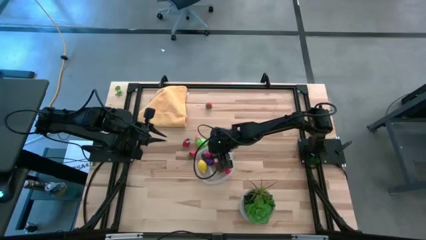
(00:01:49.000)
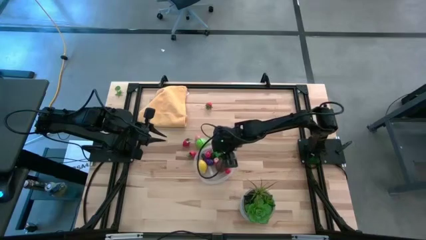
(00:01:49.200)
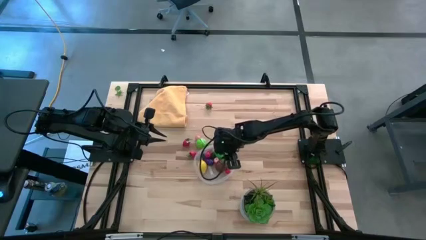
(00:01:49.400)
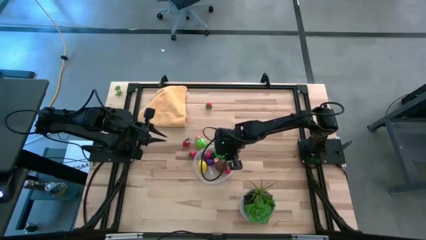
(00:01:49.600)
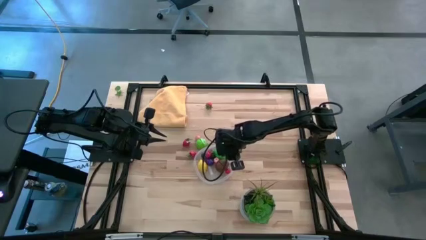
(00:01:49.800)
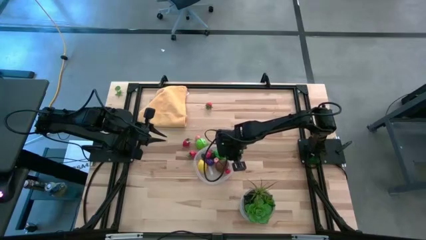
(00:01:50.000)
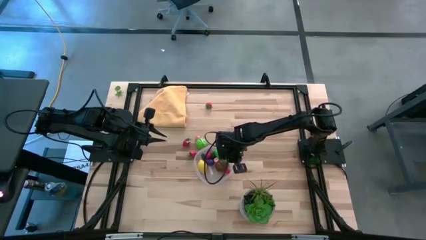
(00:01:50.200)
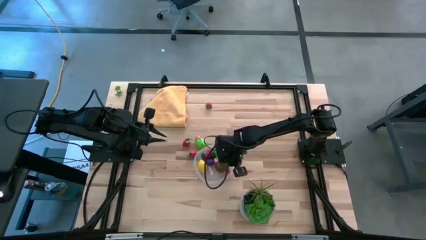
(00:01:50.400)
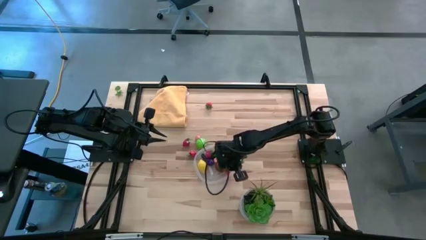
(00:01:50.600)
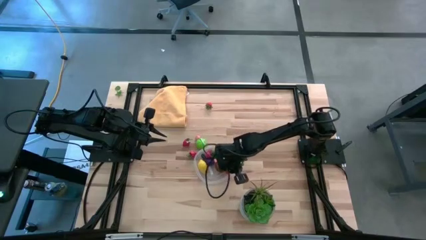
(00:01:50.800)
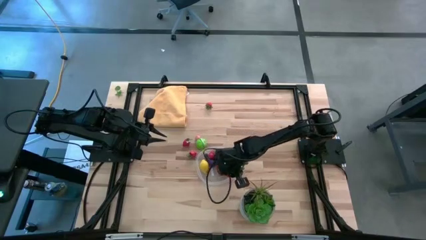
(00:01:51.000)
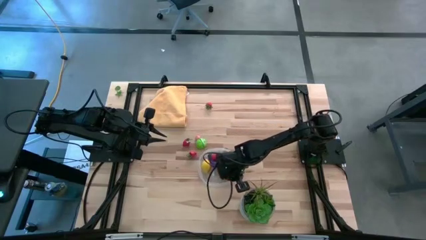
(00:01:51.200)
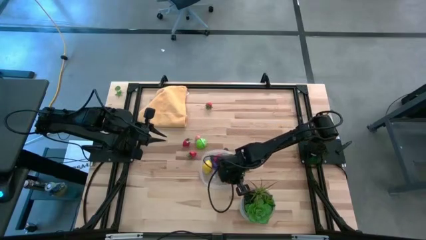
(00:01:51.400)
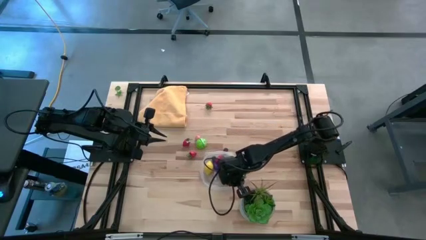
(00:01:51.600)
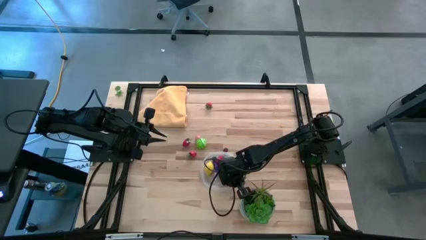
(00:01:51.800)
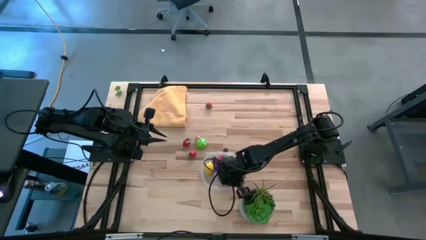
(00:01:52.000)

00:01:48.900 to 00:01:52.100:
Task: Pick and placing Produce into tupperware
Adjust the transparent bin

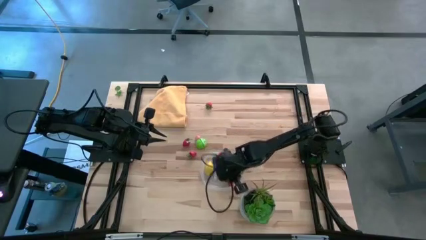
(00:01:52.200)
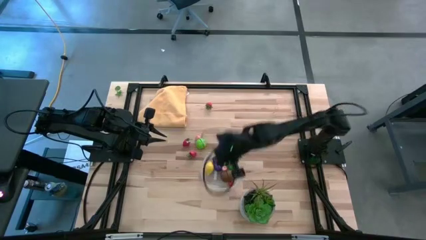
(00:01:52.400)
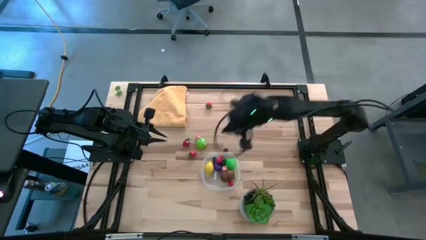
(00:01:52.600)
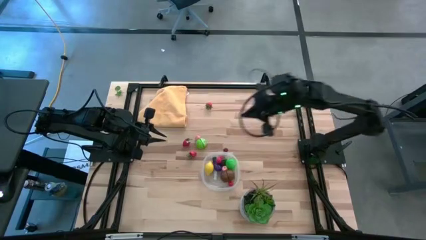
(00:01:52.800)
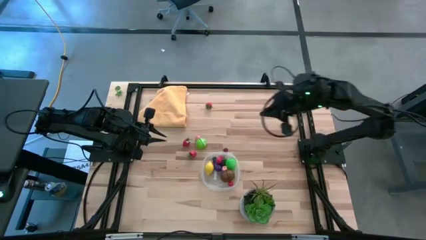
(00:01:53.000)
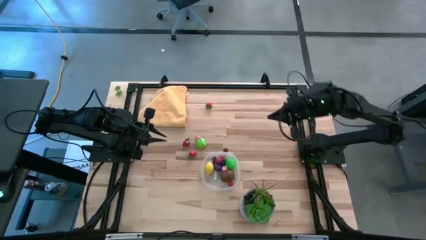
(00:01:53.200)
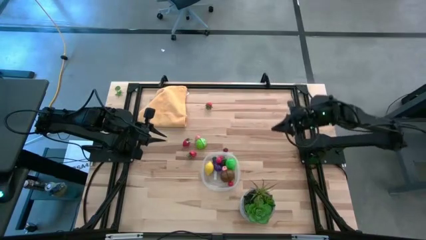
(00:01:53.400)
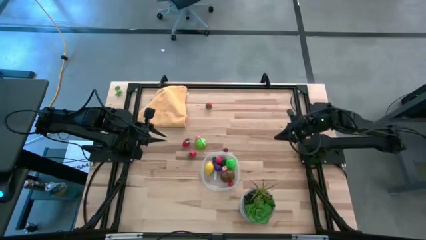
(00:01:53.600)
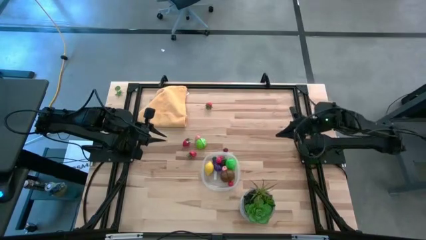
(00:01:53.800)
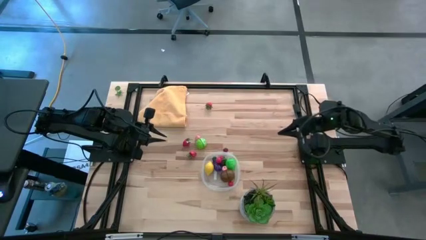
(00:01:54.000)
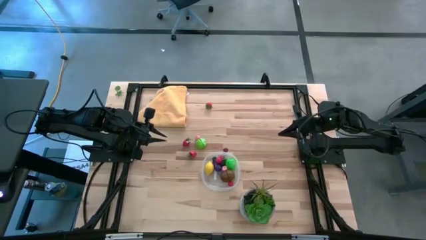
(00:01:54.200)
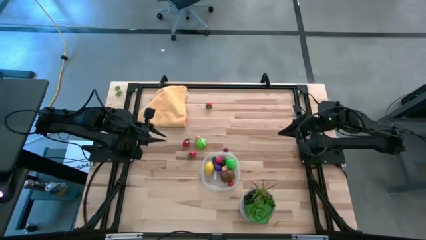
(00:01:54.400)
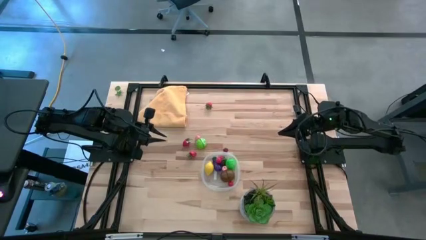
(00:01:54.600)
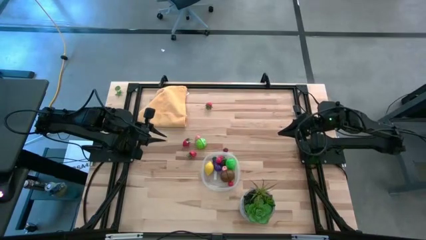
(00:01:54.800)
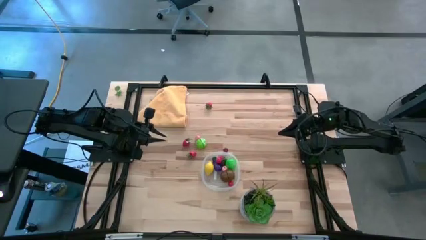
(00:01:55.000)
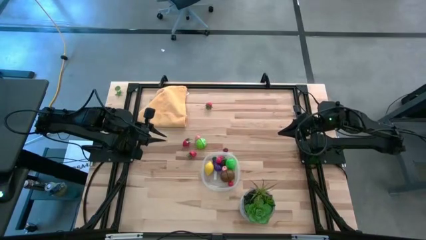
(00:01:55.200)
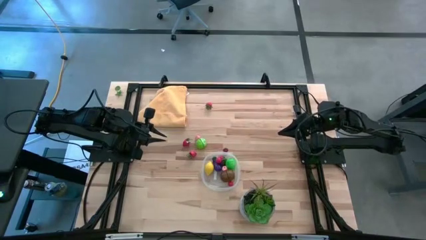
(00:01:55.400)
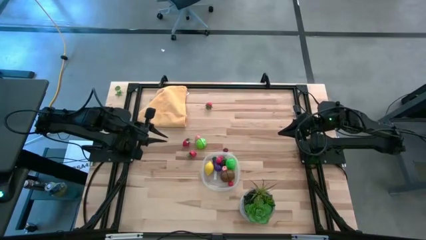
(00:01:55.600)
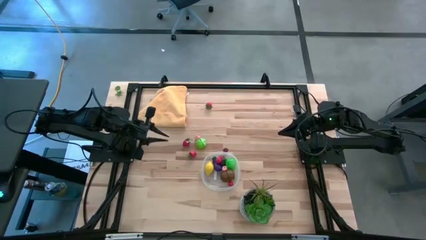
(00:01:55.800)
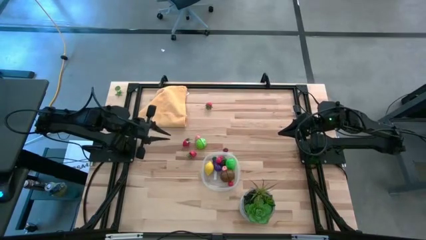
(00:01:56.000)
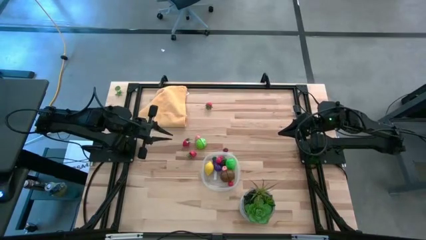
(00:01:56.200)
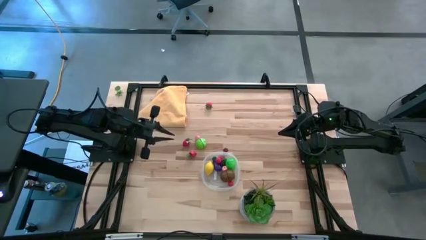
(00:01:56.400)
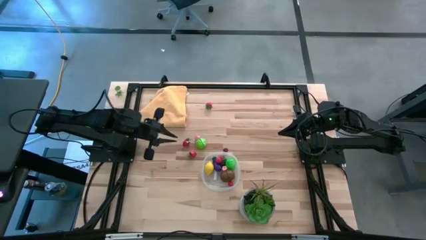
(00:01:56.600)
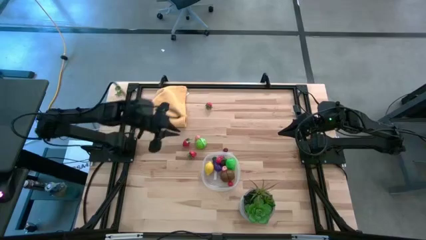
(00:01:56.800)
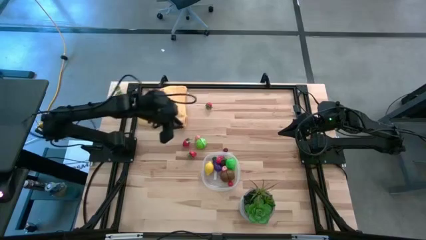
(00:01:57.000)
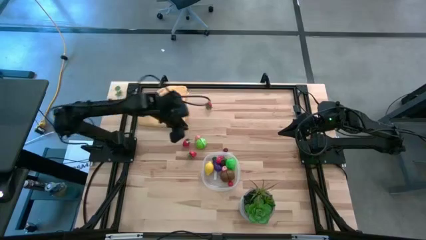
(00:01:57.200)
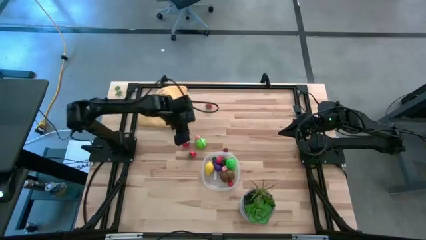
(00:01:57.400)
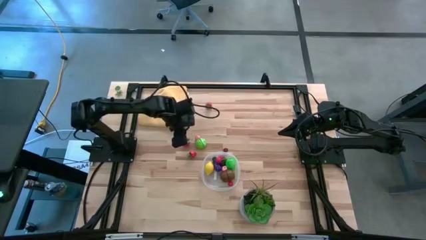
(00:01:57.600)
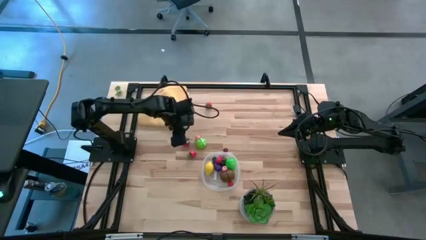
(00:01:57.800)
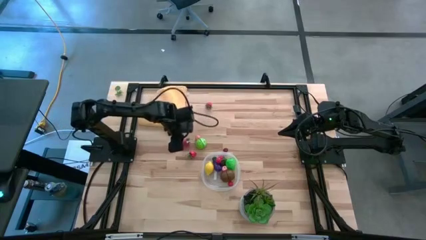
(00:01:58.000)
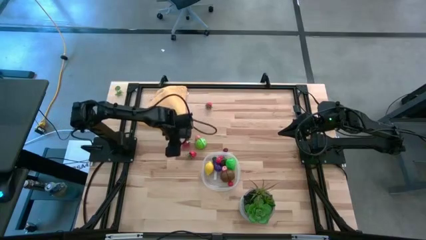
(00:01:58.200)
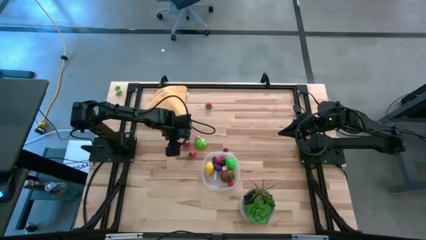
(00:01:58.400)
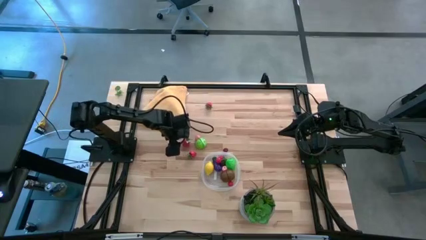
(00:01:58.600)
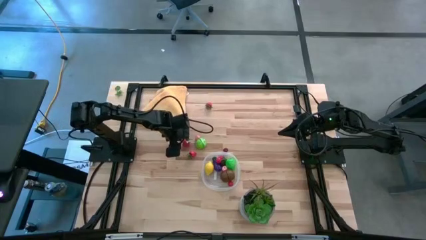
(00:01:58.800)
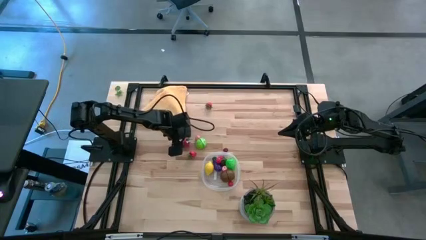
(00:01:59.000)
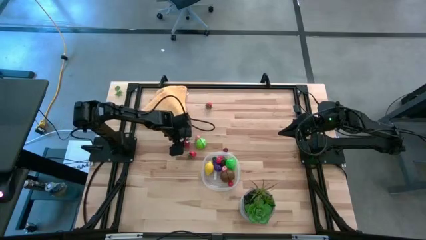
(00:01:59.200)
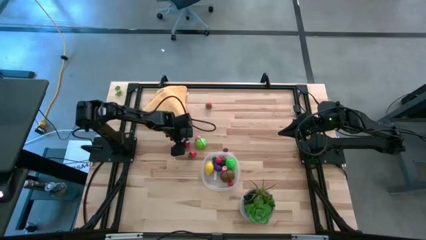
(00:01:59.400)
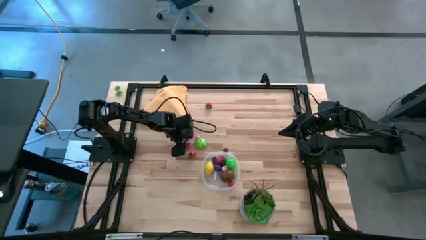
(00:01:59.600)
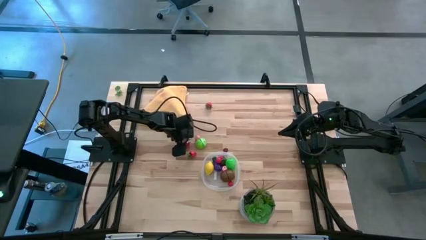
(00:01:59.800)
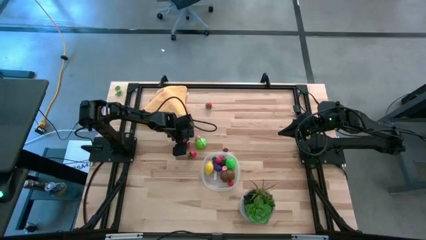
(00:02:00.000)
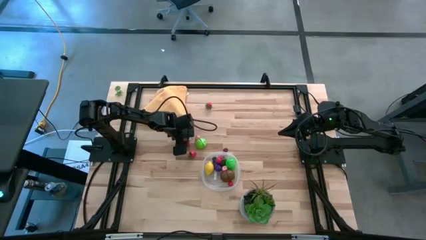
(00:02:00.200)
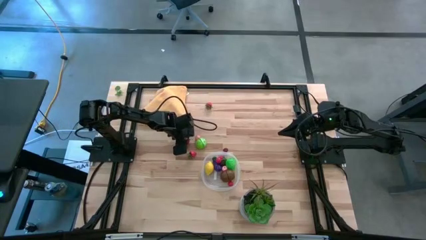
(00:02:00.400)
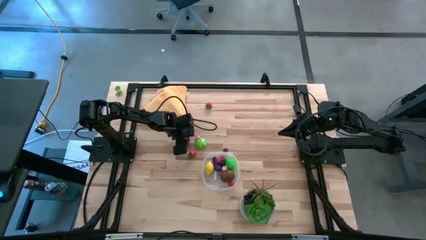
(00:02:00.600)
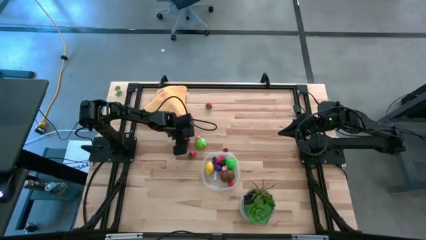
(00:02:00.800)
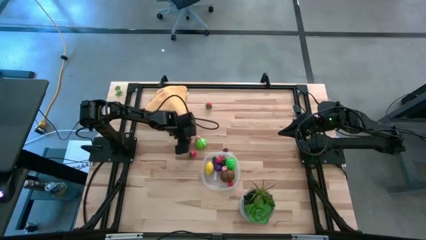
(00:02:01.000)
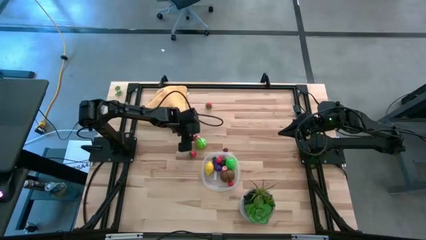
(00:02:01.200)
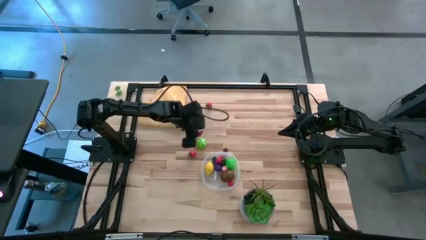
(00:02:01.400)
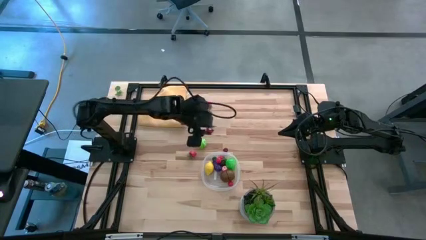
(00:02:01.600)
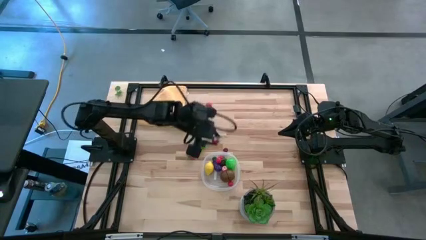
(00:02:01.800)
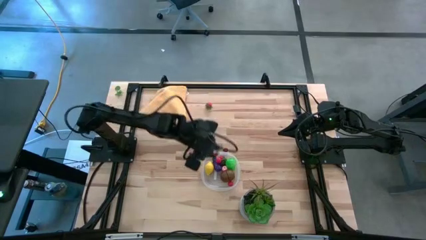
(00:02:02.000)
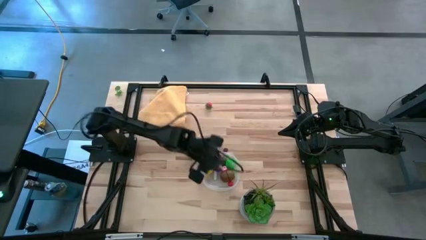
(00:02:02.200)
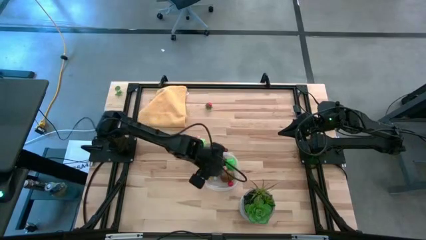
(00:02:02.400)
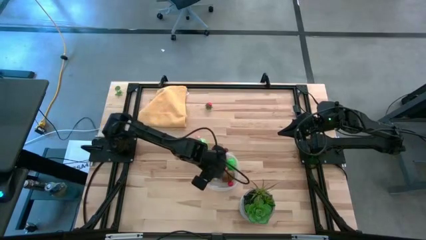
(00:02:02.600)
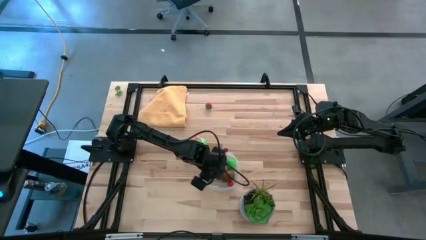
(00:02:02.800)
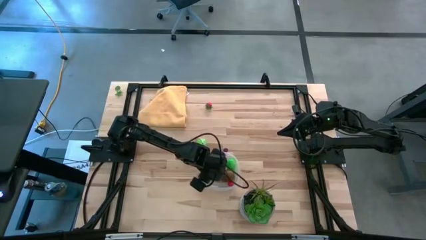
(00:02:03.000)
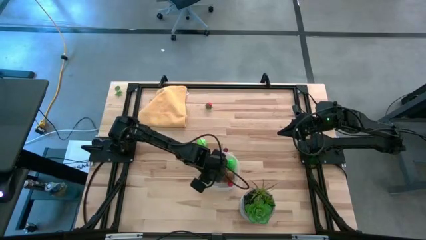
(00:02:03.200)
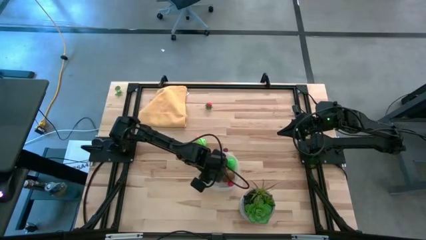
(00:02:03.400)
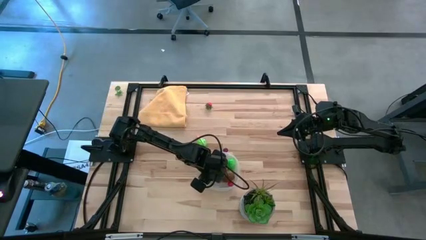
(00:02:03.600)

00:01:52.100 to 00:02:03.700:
Put the red strawberry into the transparent bin

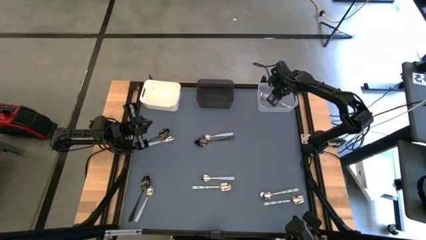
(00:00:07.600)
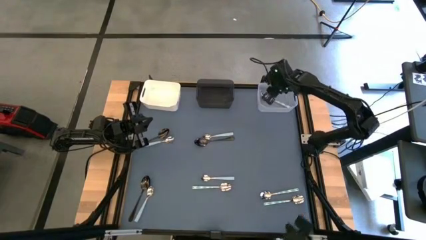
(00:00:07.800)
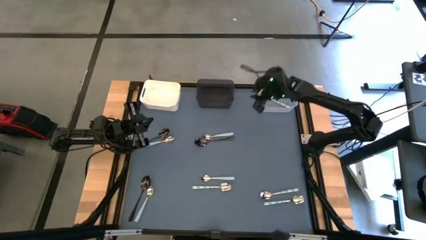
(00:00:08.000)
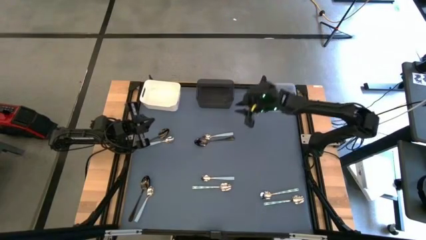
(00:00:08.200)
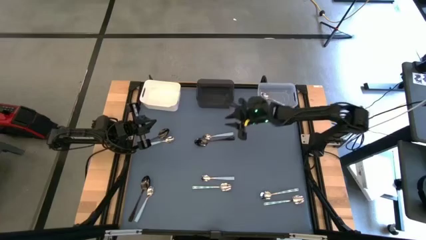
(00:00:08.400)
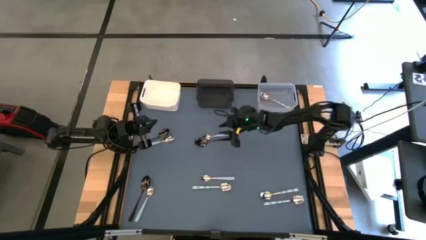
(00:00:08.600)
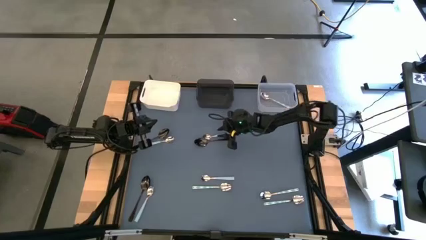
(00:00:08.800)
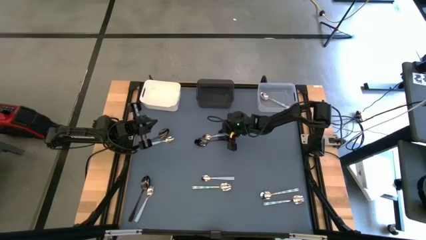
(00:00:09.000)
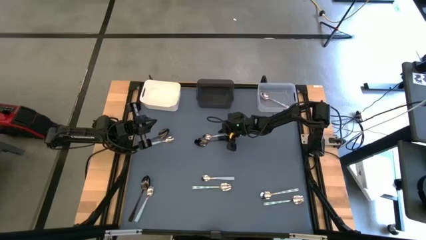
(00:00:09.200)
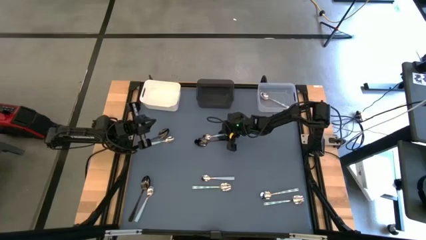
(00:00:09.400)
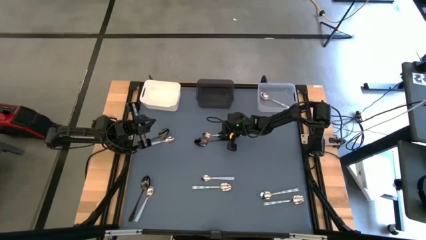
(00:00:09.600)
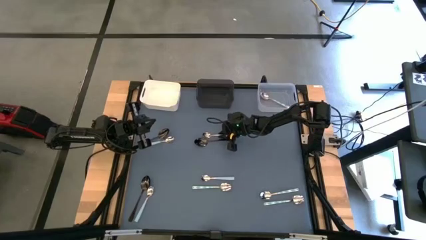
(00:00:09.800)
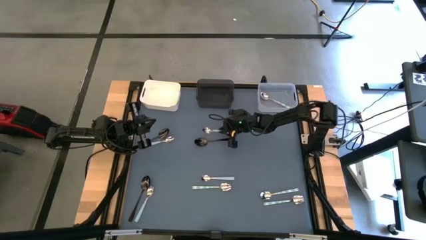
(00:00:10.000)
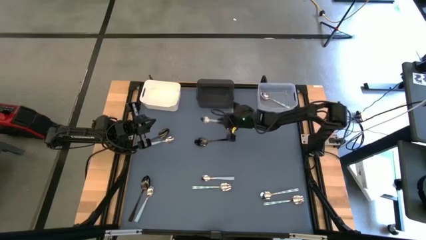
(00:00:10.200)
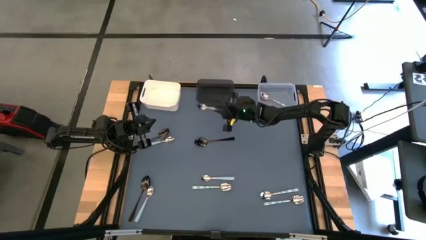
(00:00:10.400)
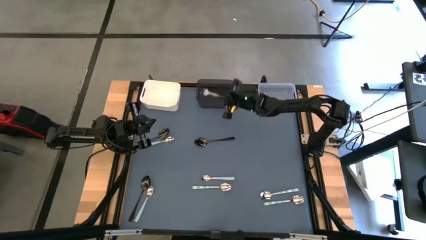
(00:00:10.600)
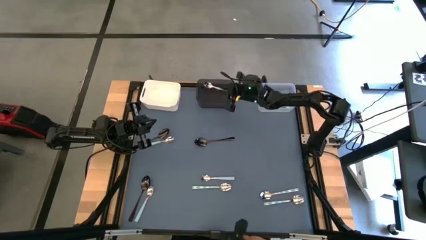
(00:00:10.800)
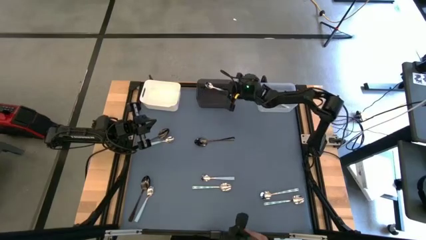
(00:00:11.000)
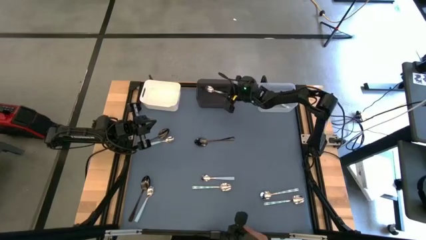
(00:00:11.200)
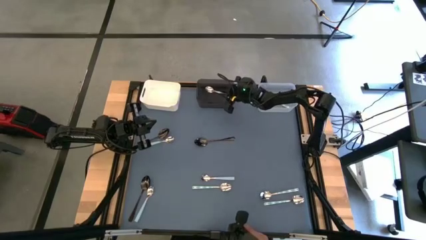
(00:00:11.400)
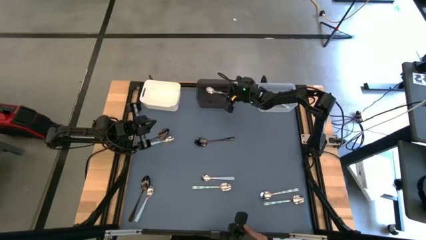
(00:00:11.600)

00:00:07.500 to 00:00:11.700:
Task: Sort silverware by color (type)
Put the top middle sky blue spoon into the black bin
